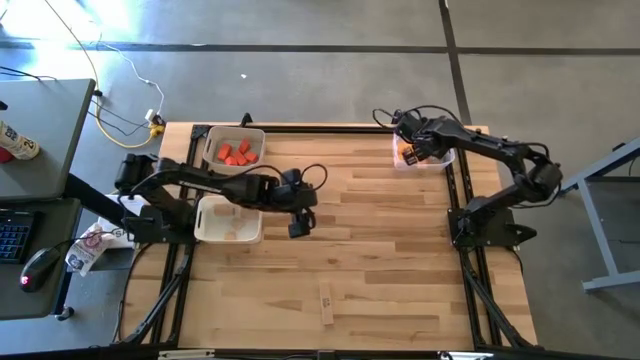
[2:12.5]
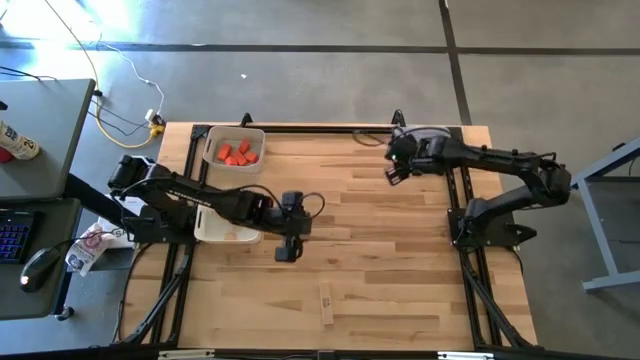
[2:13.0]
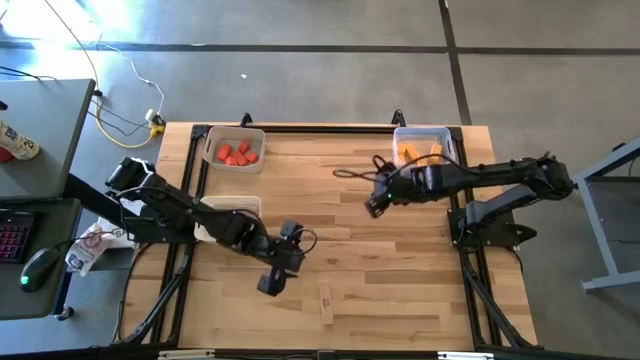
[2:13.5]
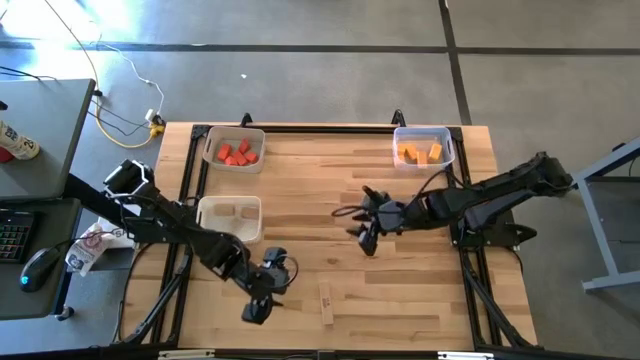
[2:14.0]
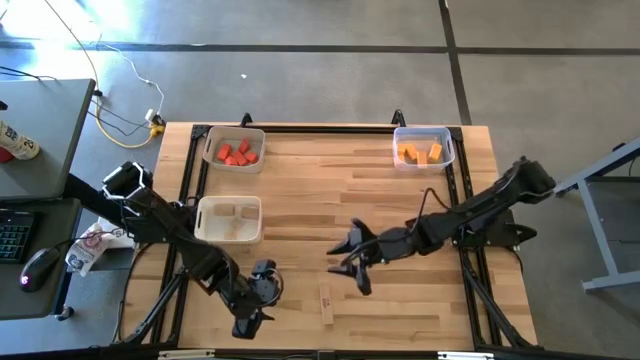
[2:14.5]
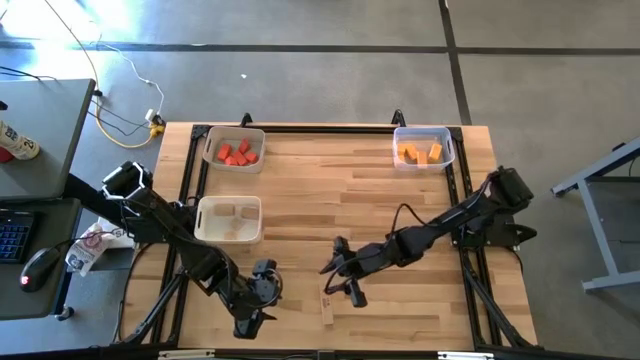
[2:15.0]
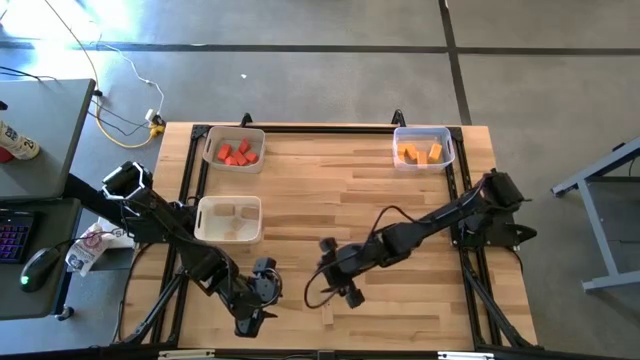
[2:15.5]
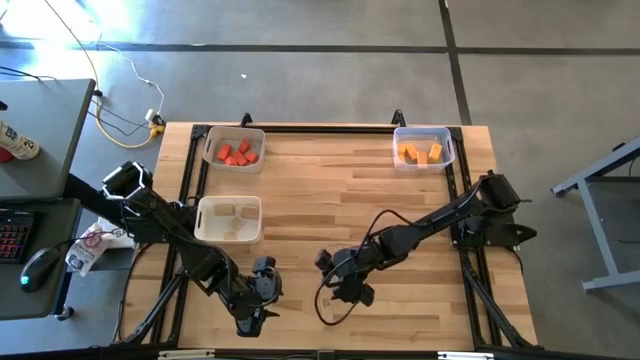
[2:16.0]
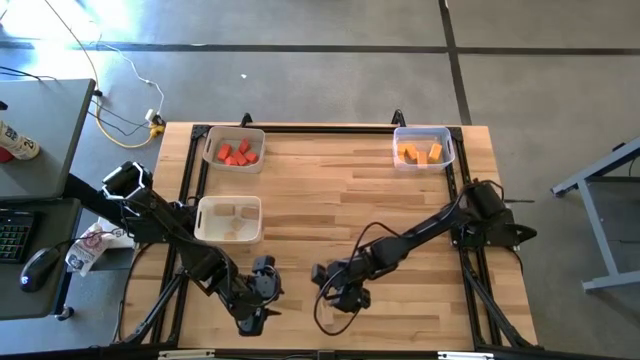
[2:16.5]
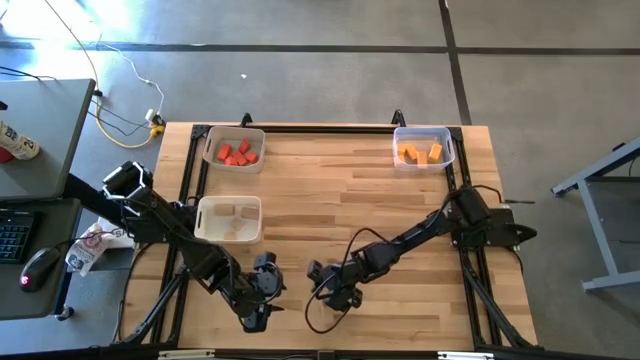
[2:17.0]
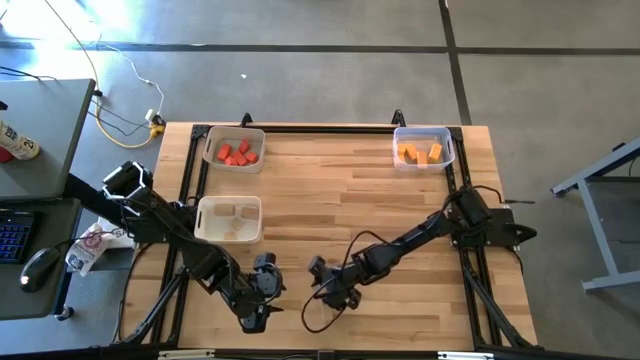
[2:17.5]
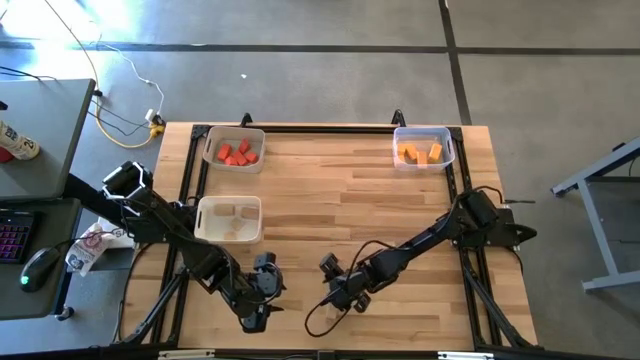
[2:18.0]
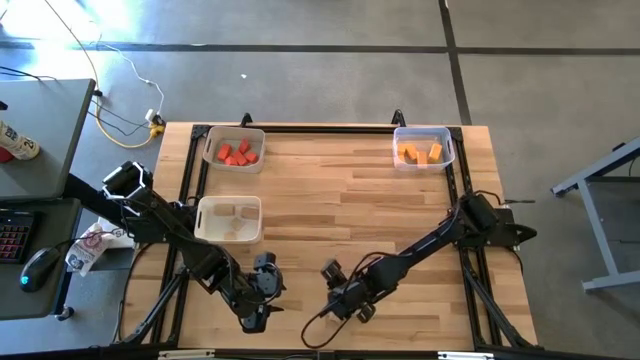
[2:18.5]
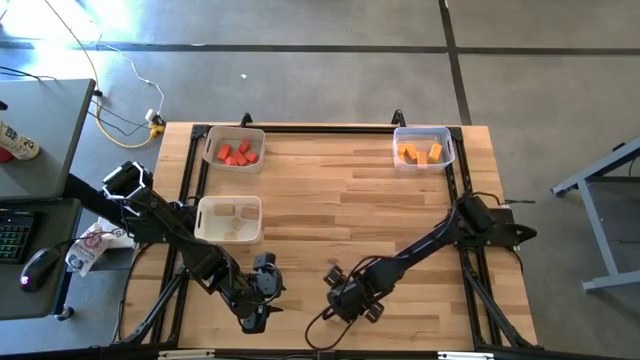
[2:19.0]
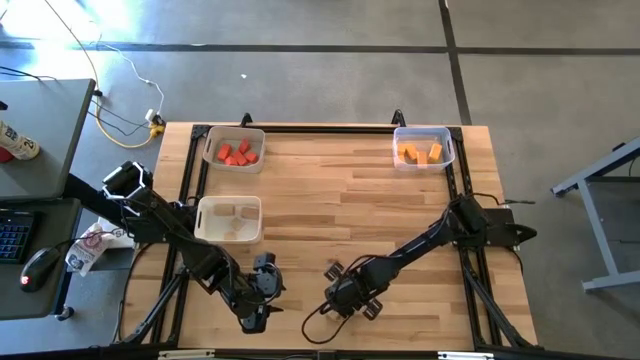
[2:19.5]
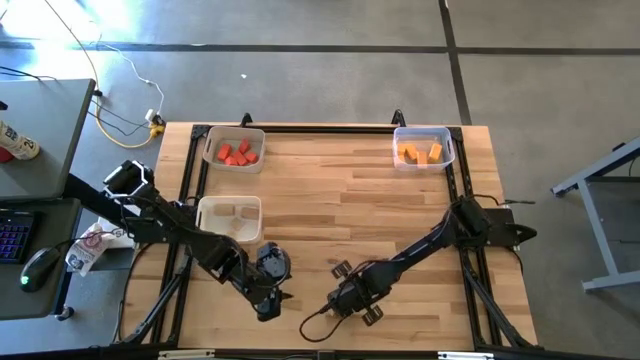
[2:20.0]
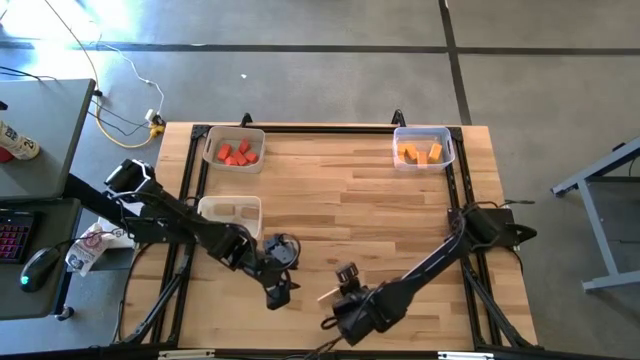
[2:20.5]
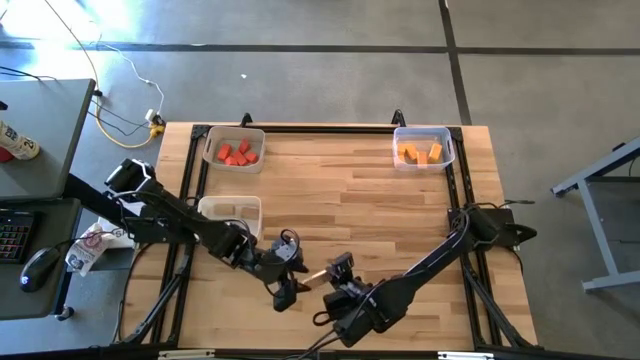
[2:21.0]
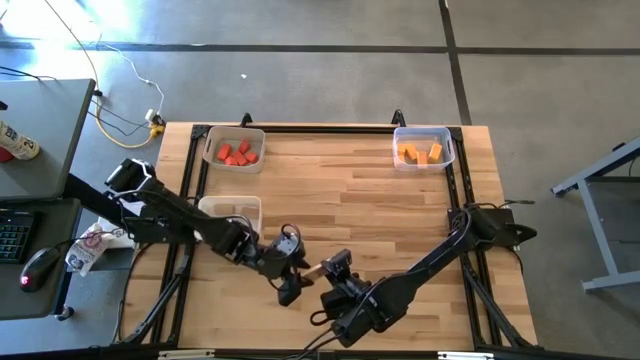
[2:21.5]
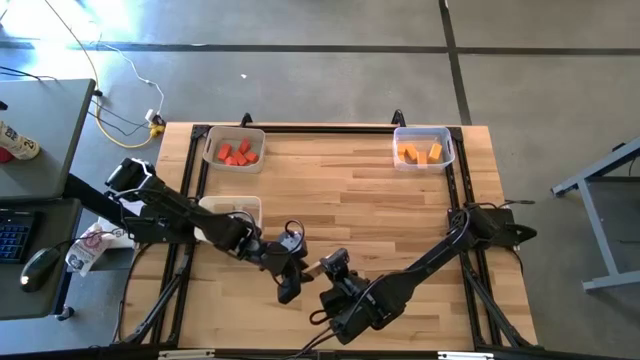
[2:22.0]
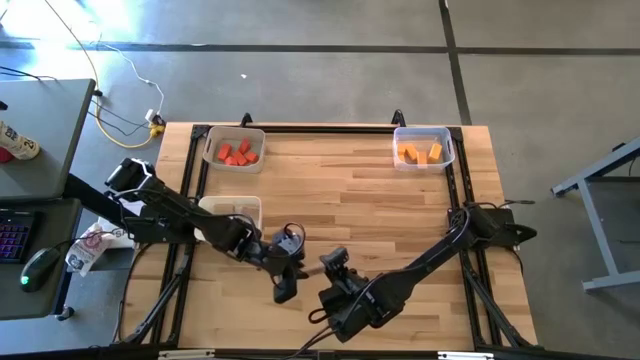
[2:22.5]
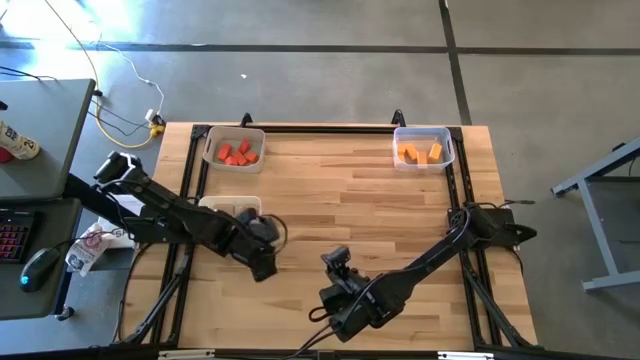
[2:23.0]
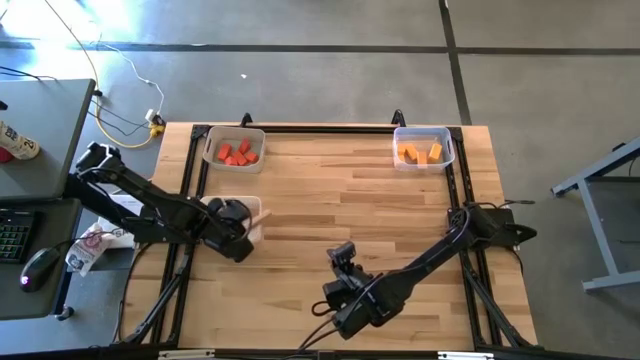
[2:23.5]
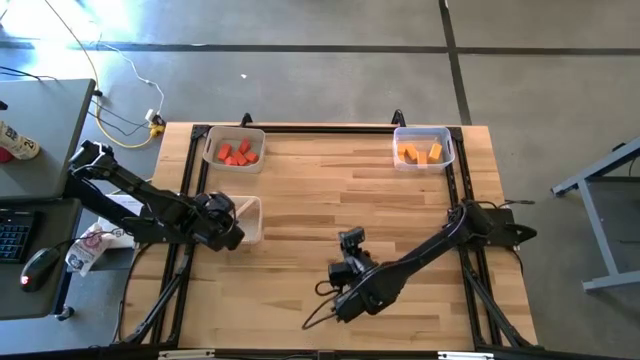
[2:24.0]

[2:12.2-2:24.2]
Task: Sort & place blocks by color
Put the brown block into the white bin

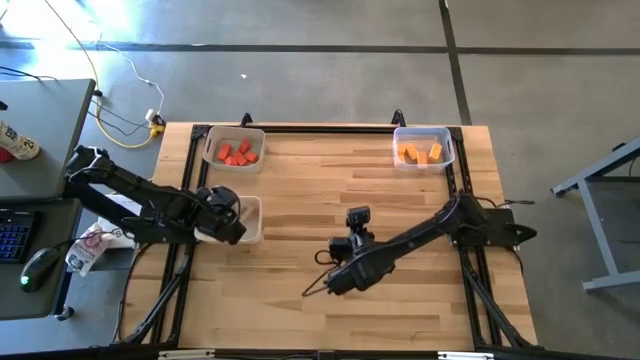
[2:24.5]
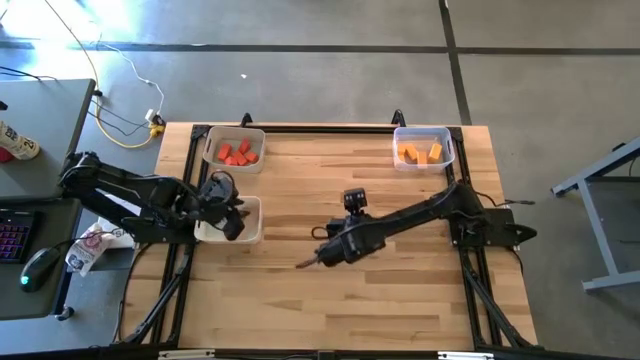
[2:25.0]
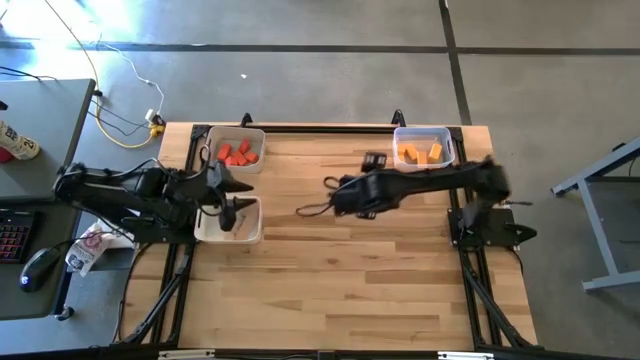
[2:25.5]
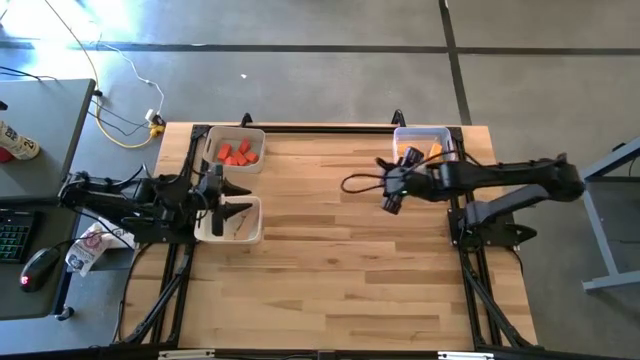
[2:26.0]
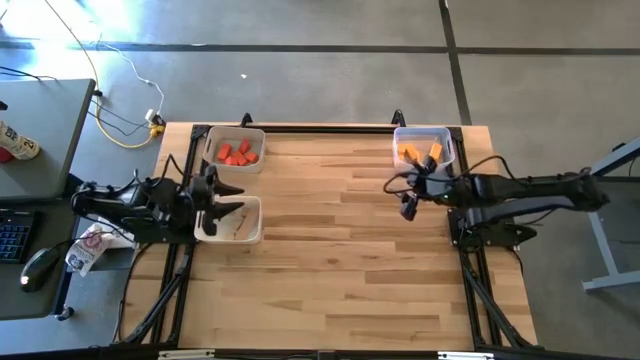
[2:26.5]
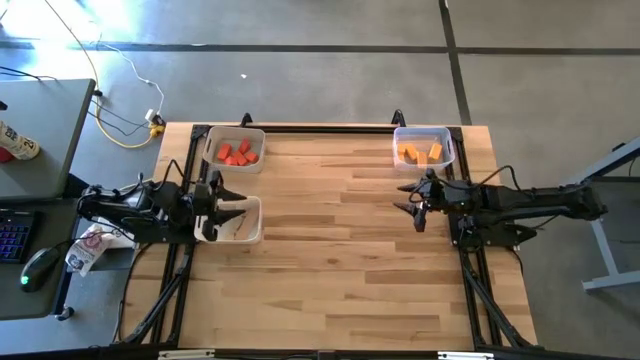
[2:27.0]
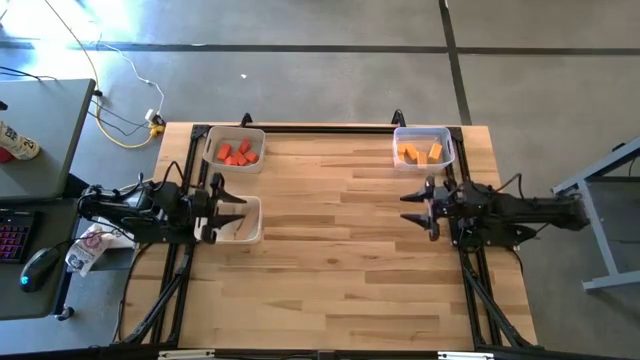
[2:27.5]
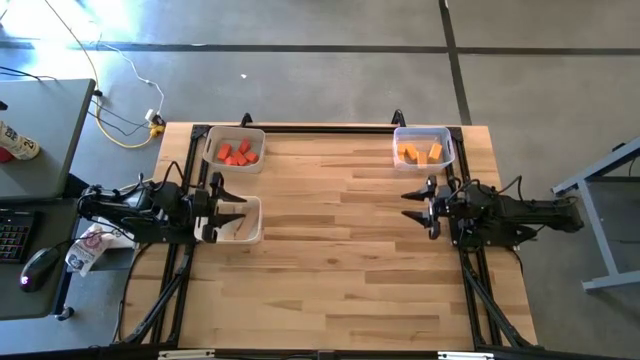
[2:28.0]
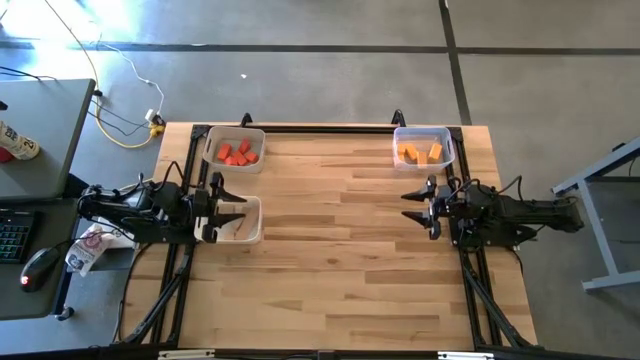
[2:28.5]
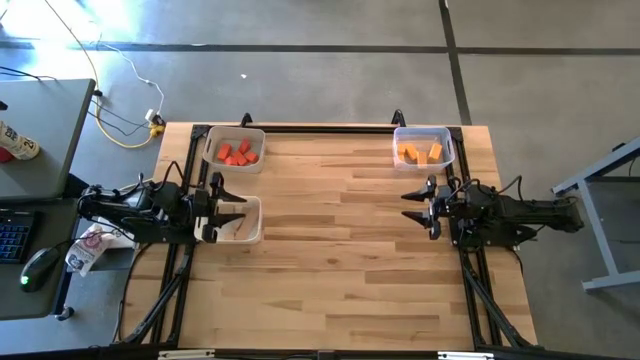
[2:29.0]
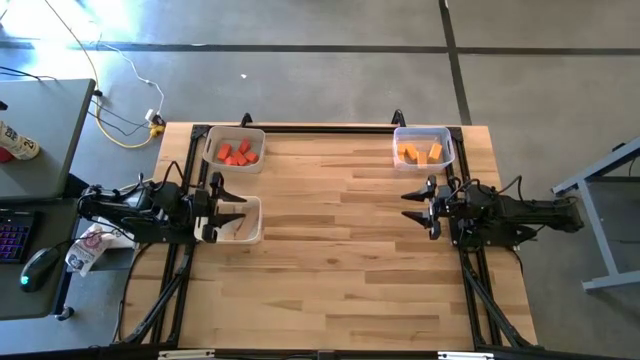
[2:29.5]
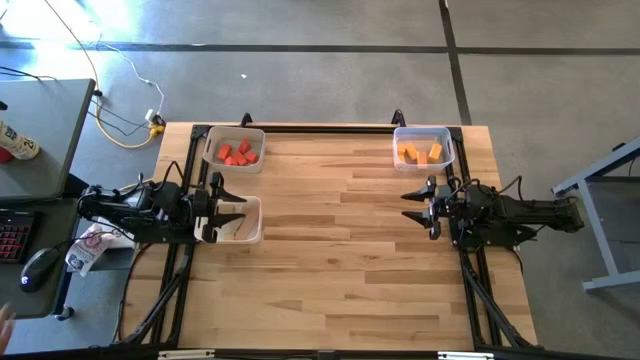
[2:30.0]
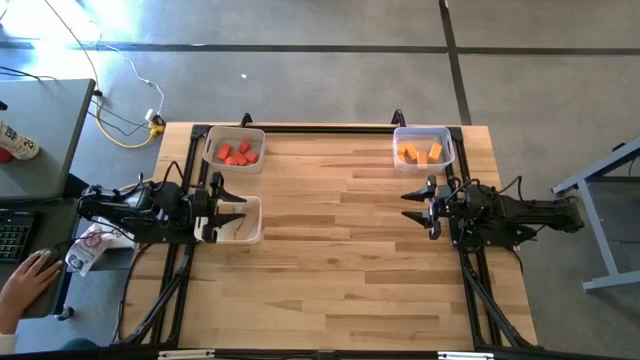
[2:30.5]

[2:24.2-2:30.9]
Return to Home Position

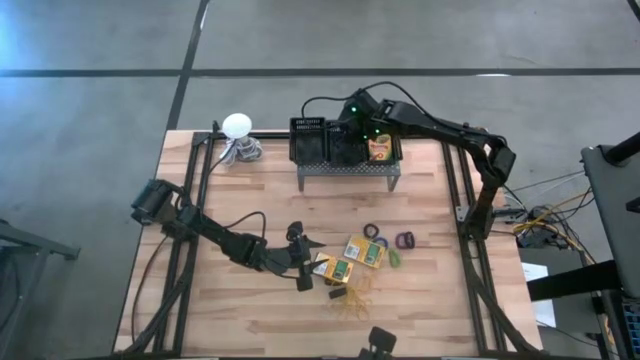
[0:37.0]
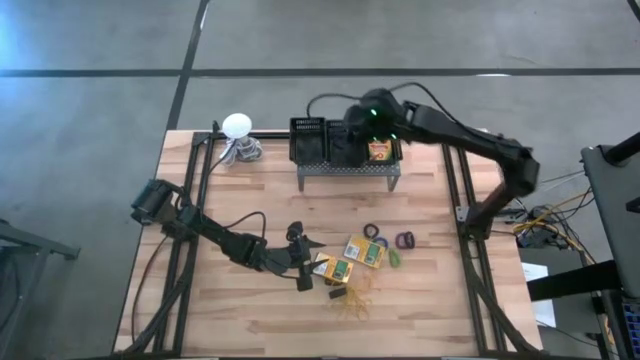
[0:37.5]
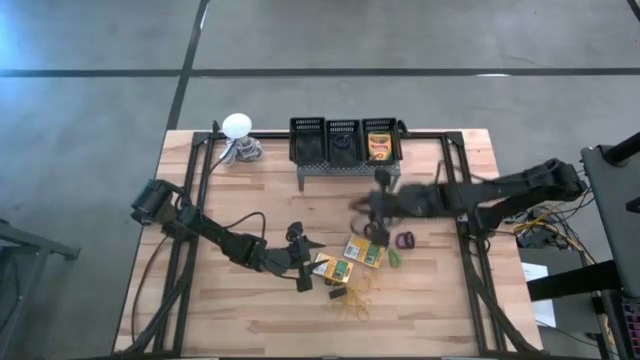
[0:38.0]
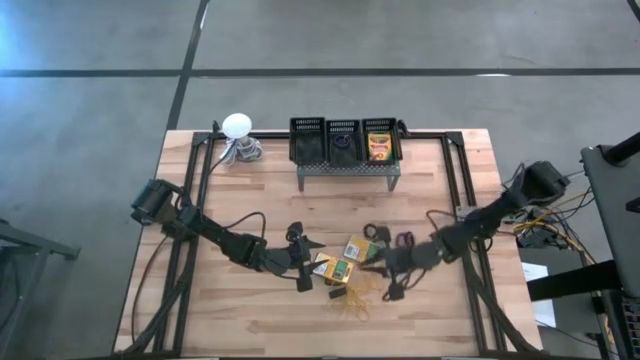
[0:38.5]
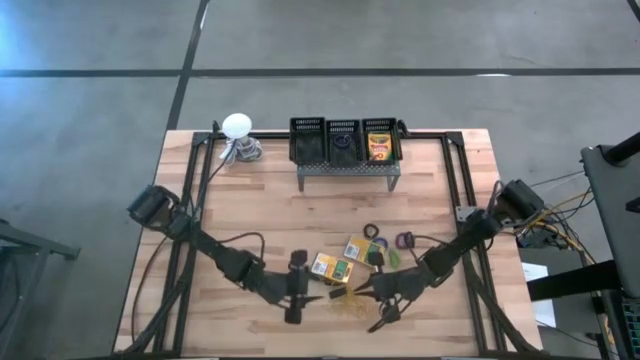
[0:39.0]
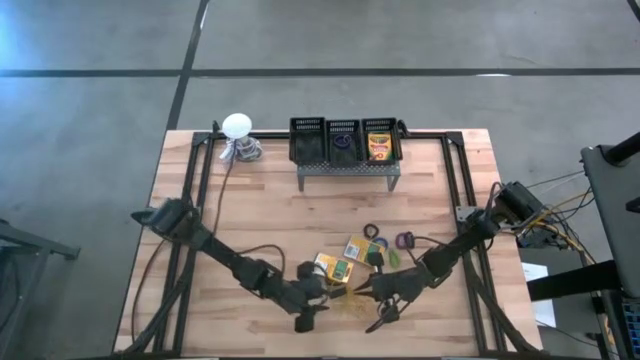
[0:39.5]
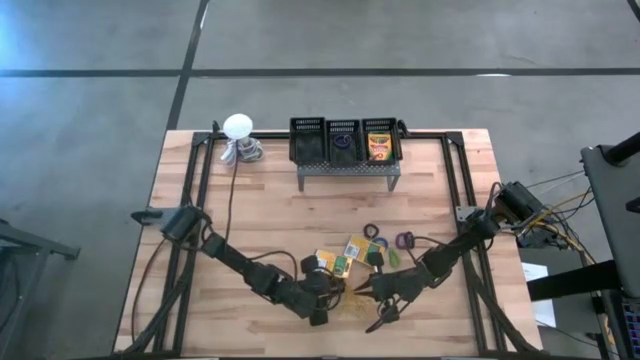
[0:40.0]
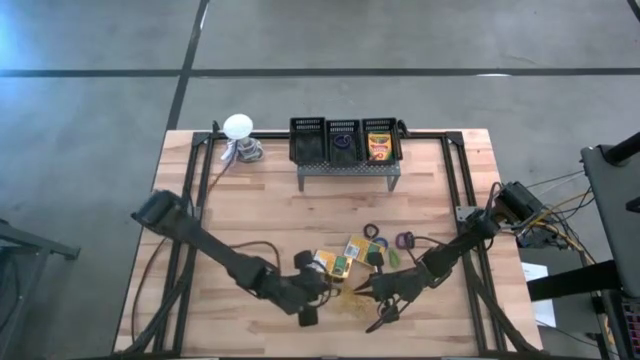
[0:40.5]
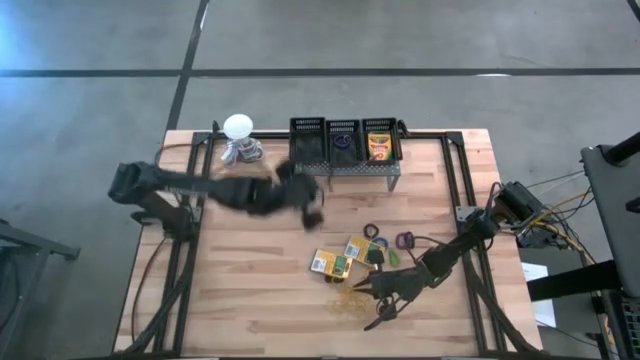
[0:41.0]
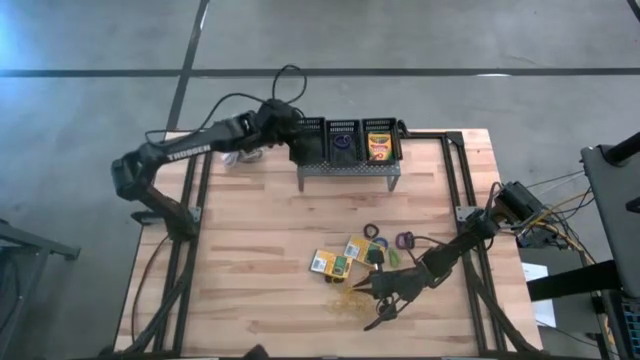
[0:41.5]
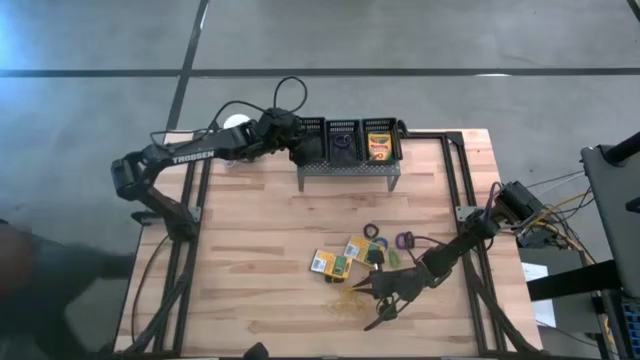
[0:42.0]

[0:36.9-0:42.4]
Task: Pick & Place Office Desk Supplies
Put the black rubber band into the left black bin on the shelf
